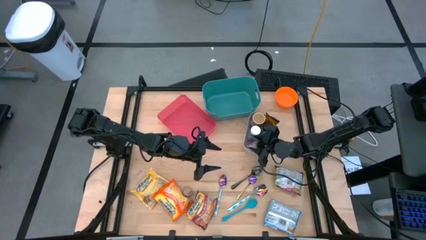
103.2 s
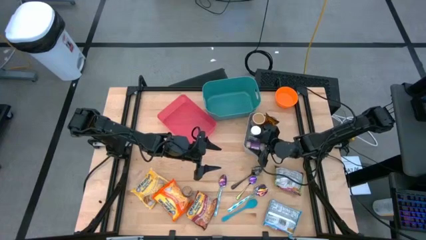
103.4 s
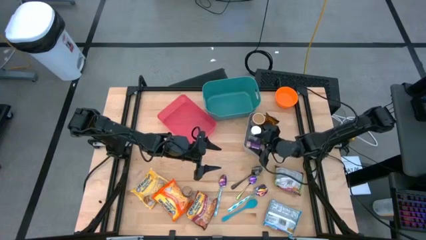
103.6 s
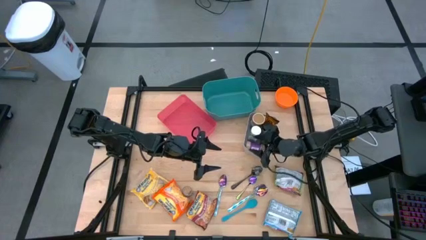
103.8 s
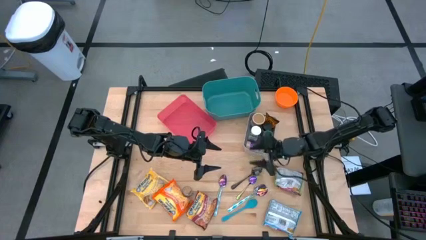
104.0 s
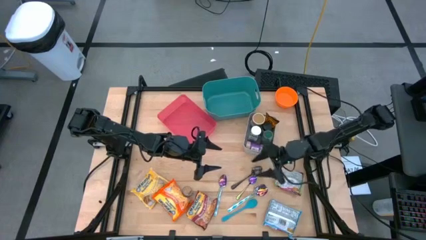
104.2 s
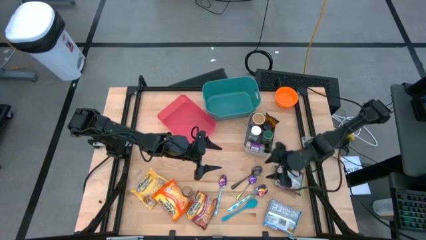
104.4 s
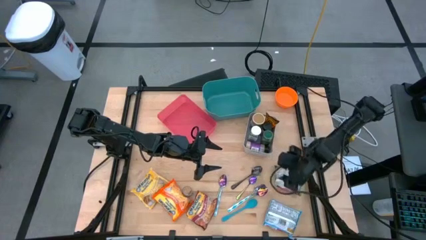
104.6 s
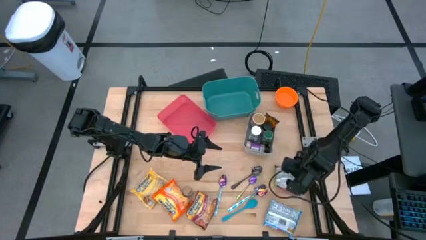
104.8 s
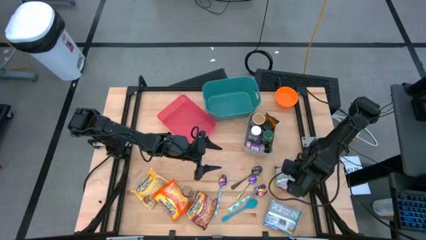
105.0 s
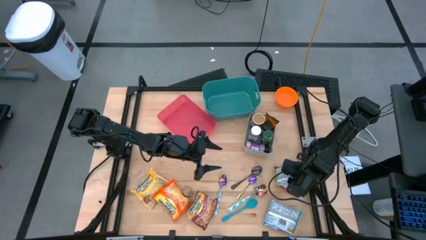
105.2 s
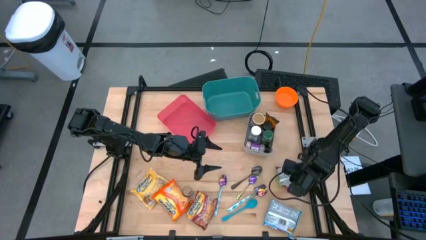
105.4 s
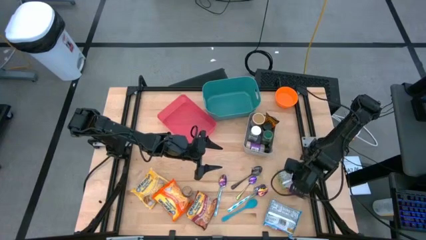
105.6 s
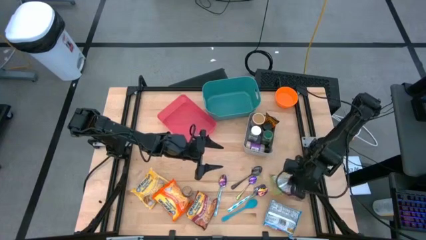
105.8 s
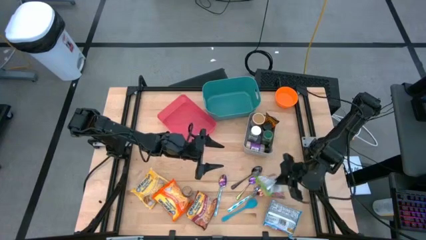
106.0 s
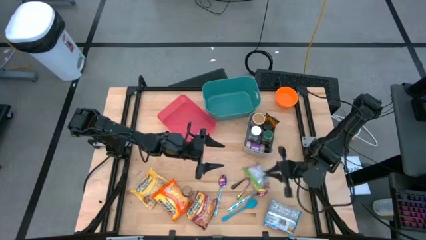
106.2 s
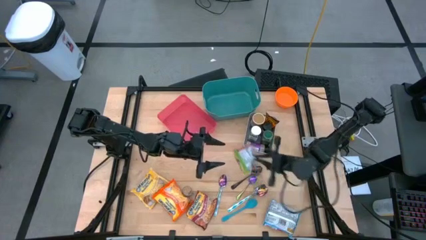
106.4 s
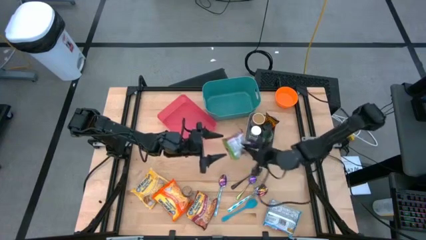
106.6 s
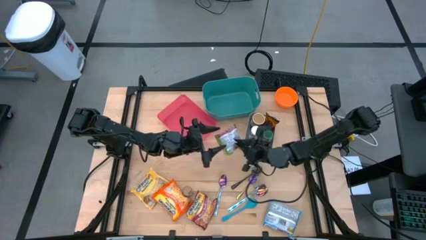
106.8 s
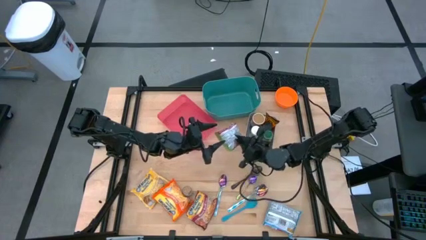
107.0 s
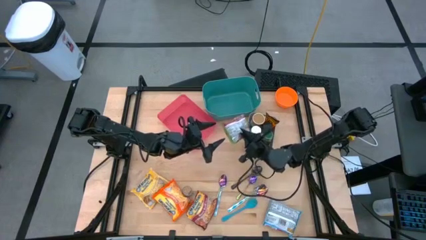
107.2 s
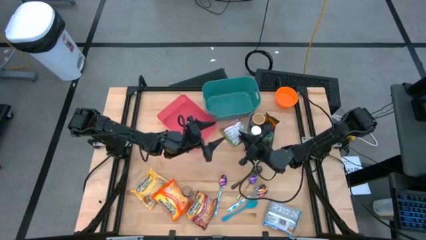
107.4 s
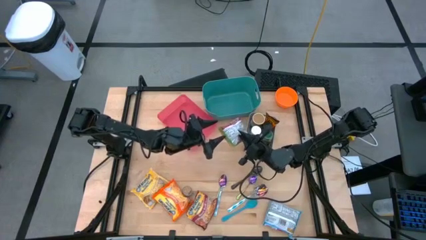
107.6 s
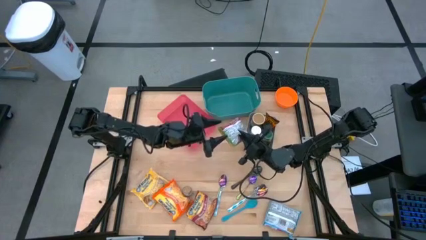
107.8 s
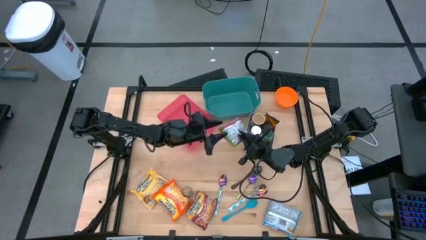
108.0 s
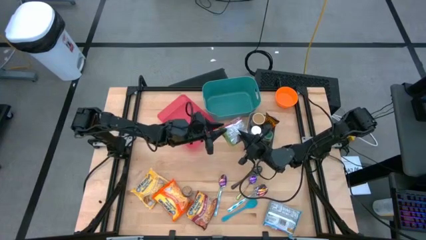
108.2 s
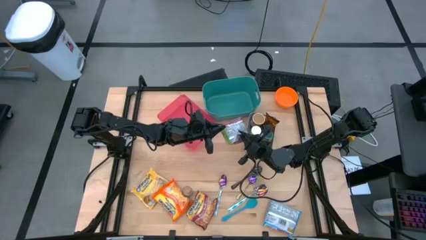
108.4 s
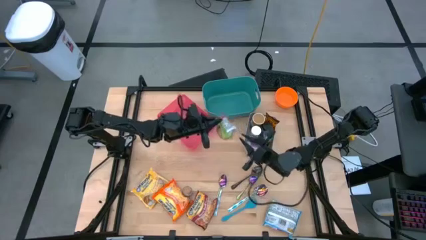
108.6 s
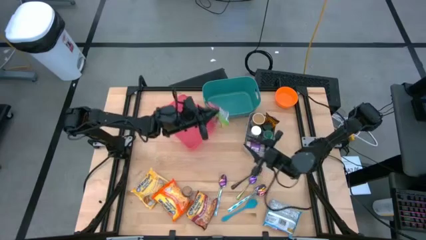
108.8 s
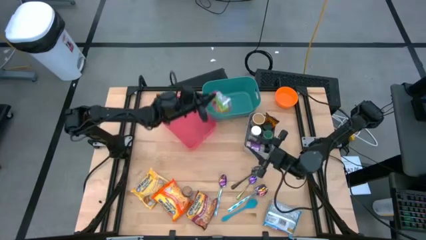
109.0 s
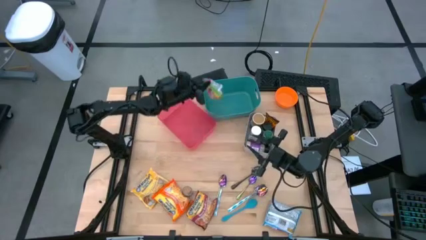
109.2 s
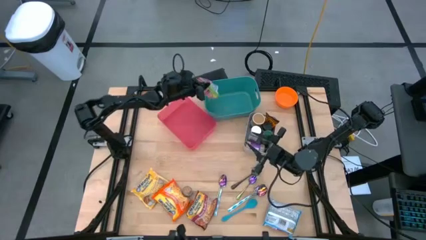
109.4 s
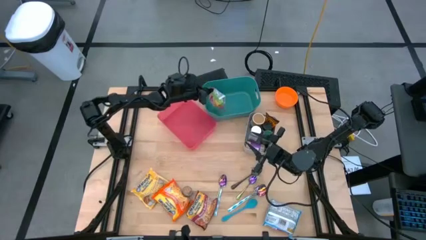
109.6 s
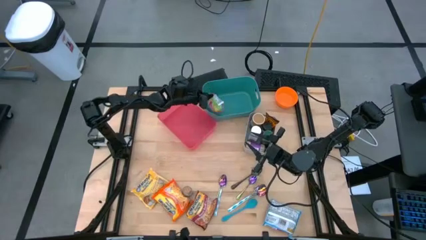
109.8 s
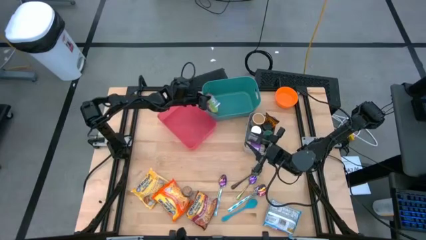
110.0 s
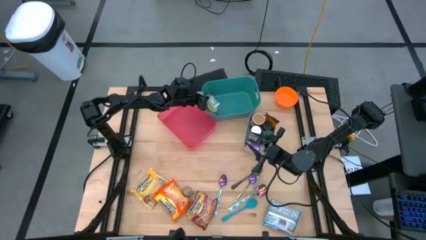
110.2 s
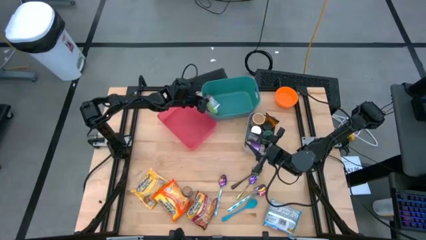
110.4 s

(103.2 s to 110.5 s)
Task: Pick & Place Food Item
Put the green noodle pack into the green bin

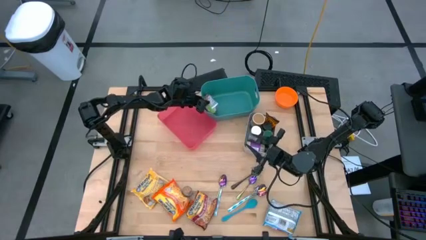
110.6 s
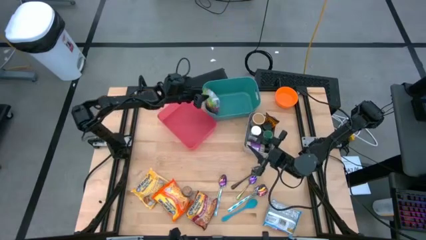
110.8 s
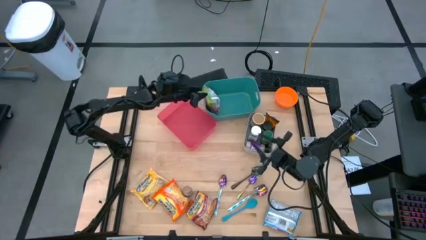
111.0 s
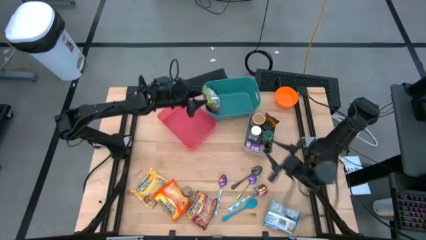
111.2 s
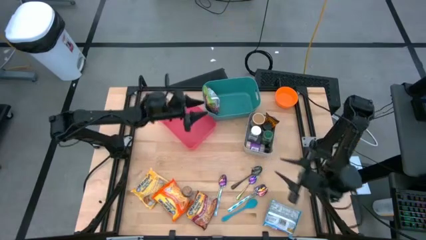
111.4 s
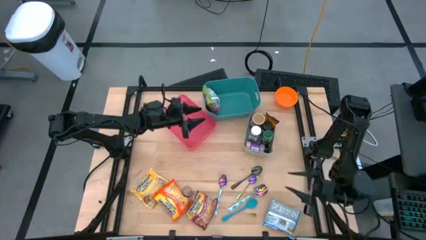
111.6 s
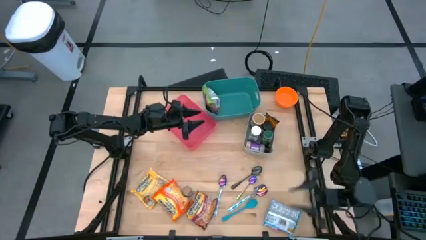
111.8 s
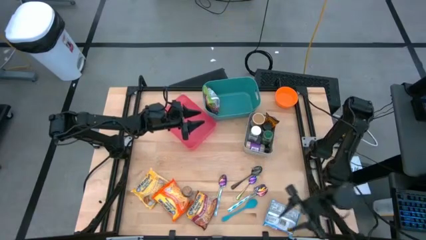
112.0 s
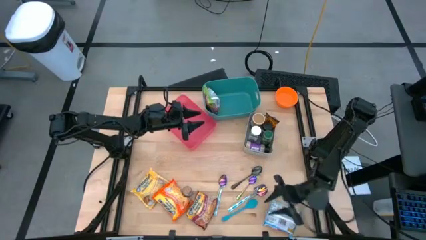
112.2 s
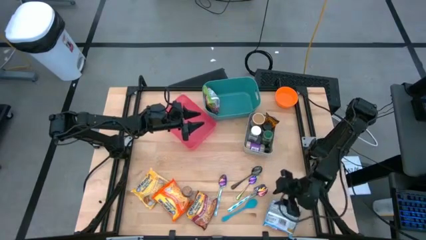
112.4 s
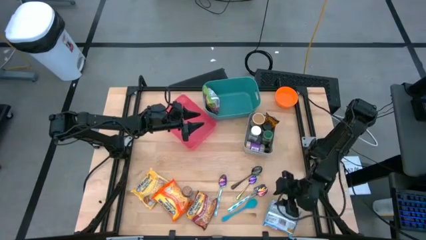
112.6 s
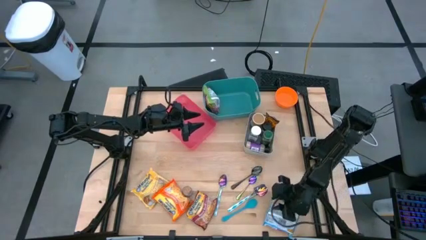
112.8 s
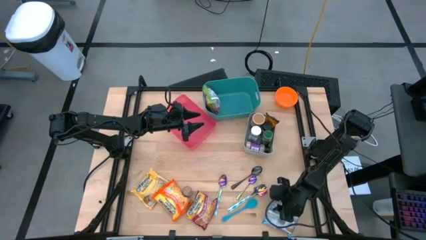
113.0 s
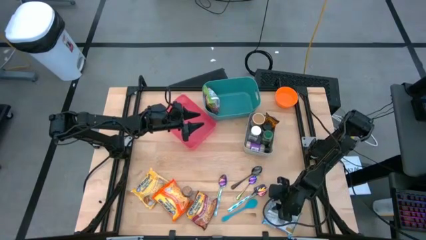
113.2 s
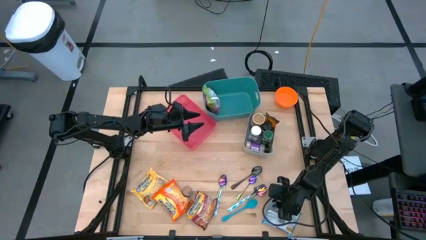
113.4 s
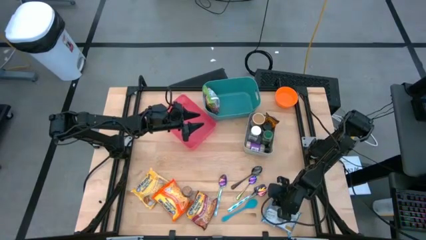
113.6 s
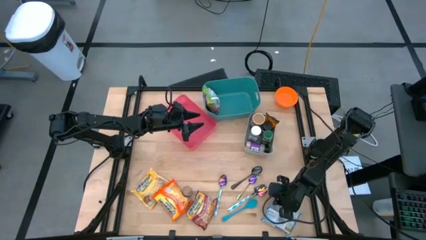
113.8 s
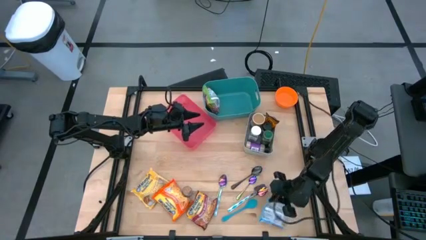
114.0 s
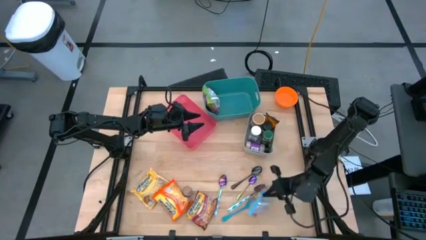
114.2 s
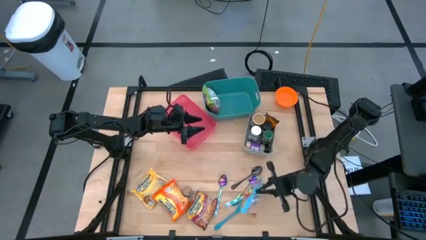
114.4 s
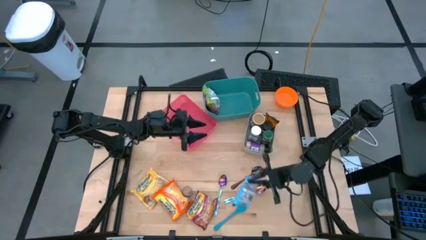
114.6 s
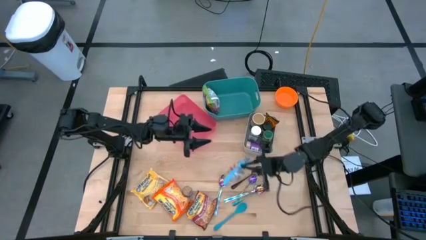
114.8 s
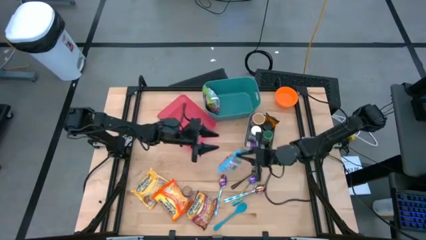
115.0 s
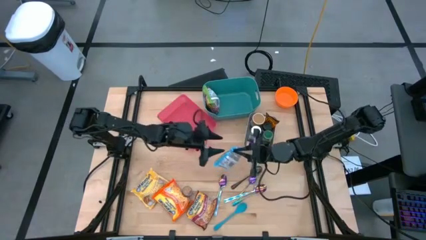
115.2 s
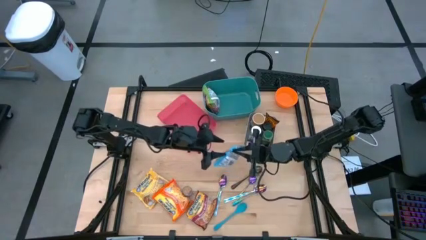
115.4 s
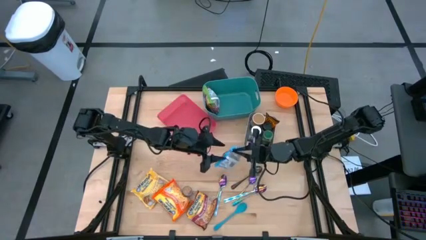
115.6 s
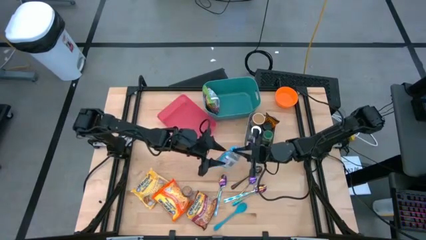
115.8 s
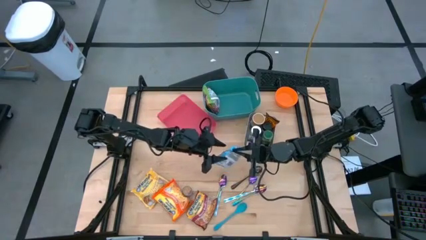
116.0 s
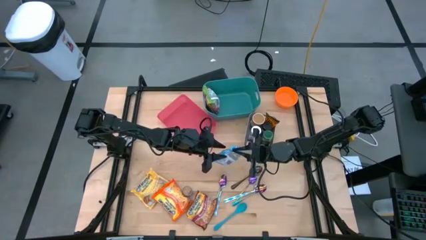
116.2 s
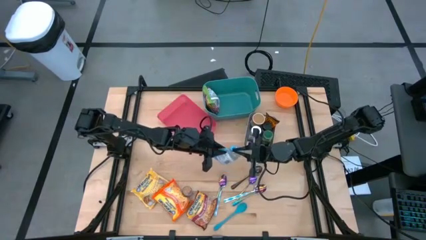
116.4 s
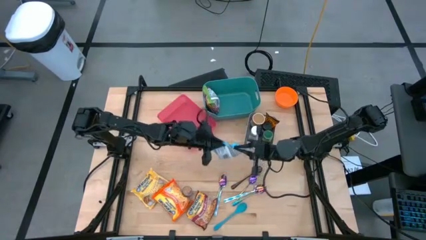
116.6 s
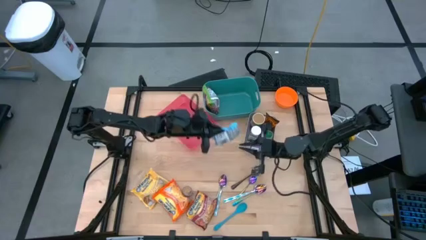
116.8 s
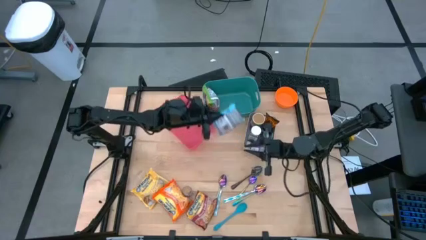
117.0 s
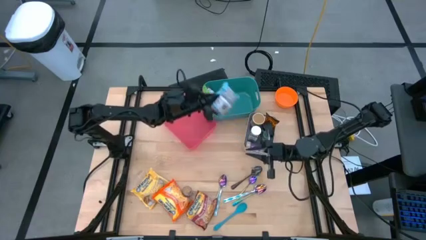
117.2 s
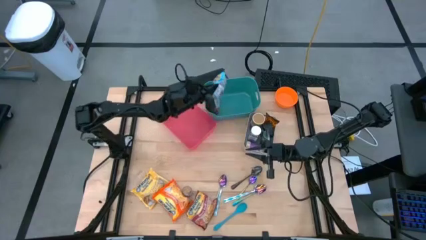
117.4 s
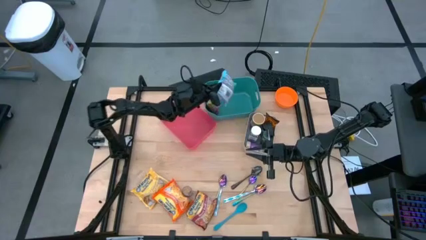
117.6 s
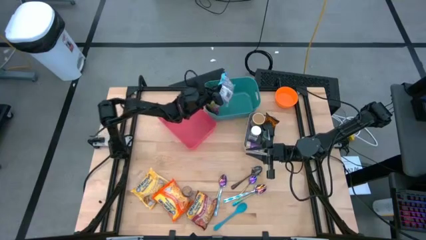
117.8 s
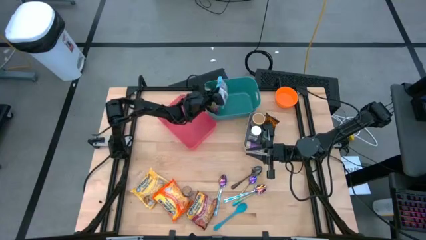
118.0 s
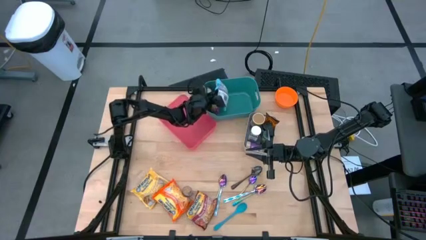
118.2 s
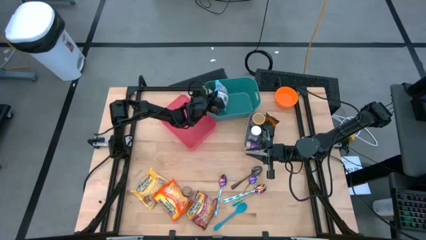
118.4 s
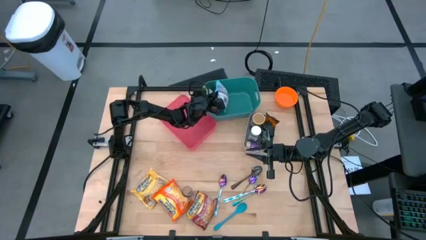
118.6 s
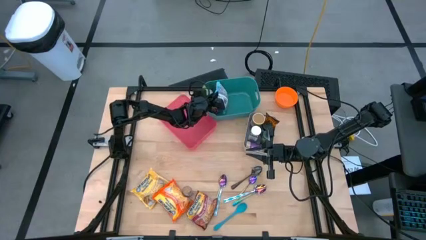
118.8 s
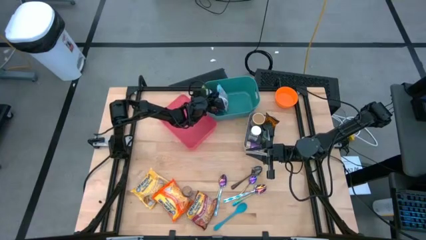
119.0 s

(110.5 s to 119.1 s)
Put the blue noodle pack into the green bin

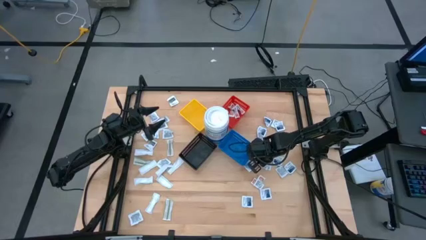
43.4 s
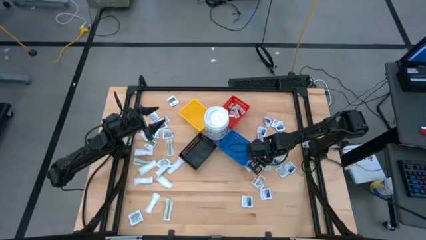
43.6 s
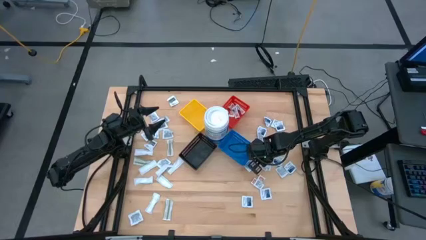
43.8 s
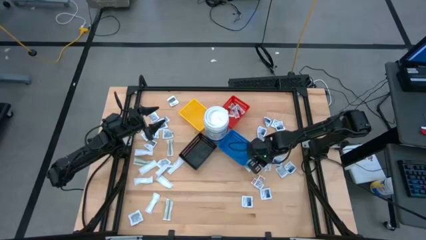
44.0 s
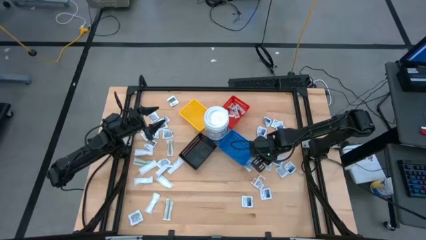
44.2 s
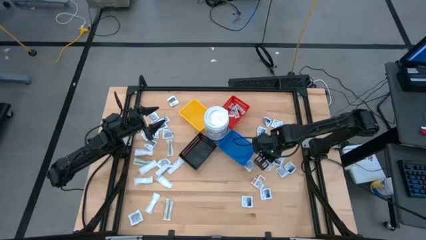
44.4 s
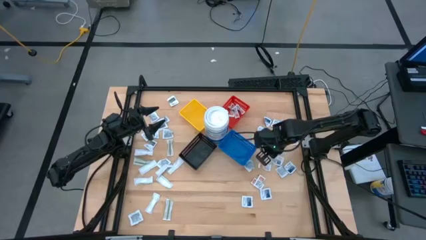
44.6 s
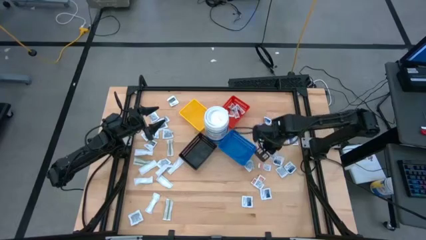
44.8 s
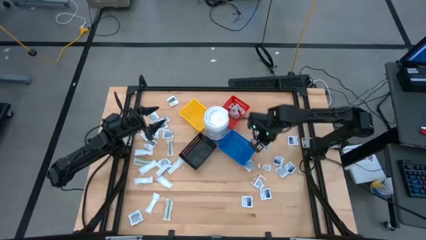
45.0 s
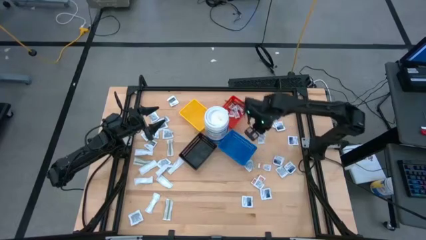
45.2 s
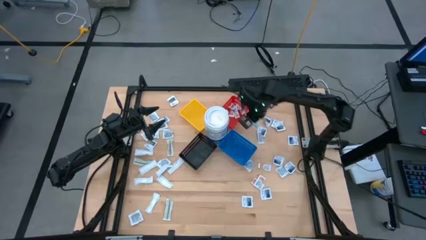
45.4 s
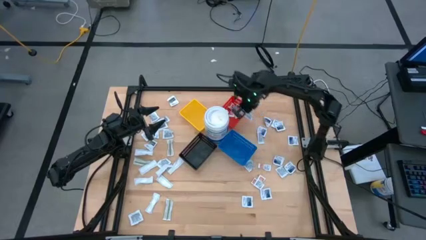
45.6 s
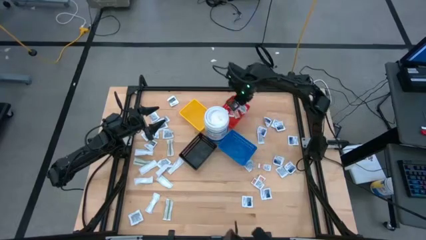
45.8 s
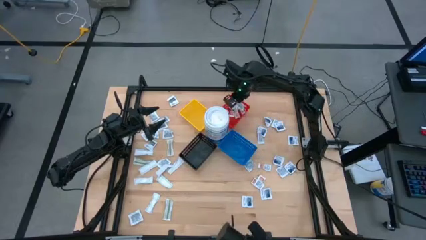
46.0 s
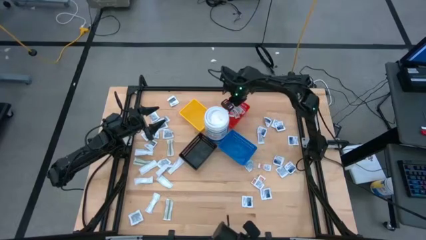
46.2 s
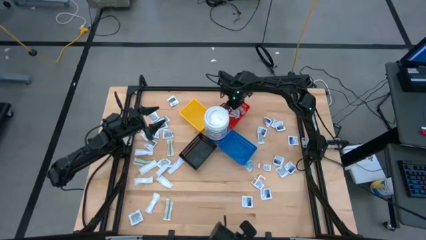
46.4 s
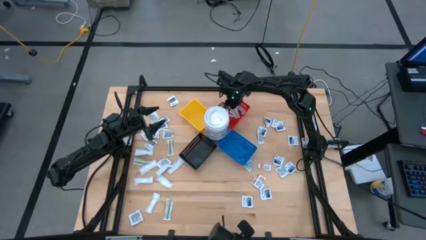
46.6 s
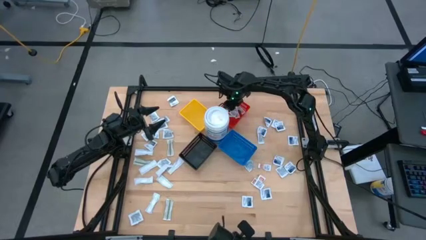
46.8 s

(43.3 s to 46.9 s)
Task: Pick & Place First Aid Supplies
Put the ointment pack into the red bin
